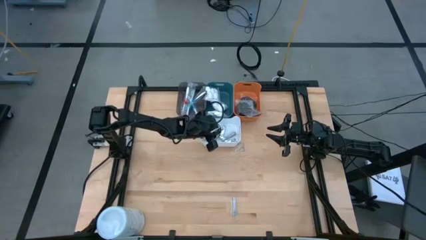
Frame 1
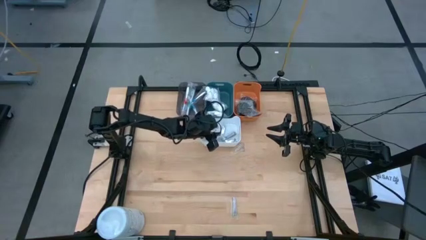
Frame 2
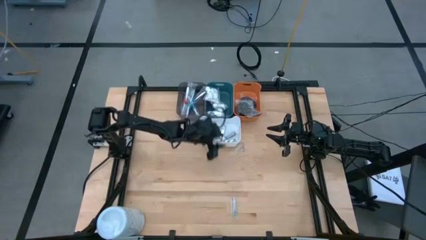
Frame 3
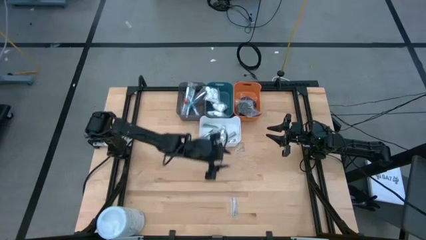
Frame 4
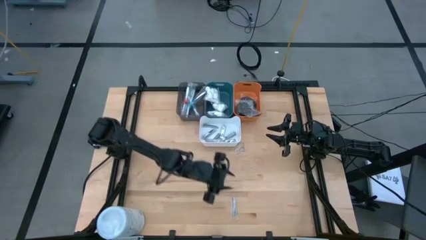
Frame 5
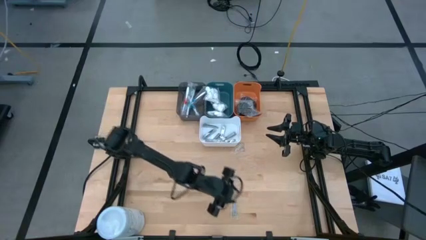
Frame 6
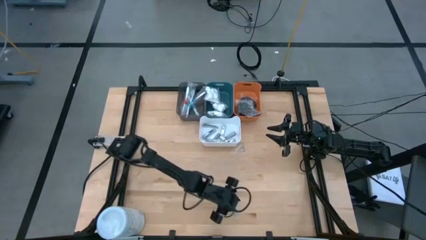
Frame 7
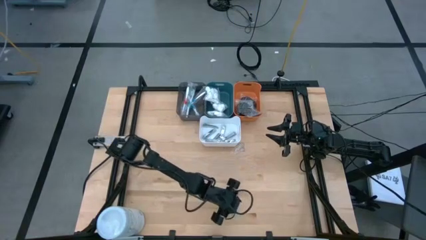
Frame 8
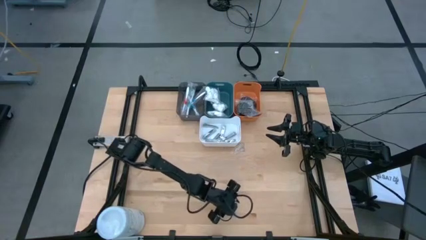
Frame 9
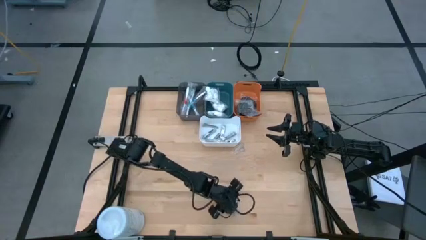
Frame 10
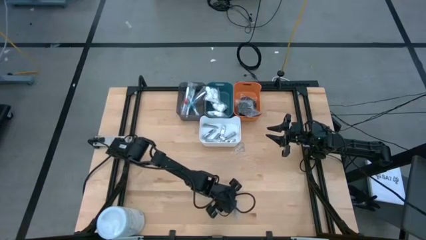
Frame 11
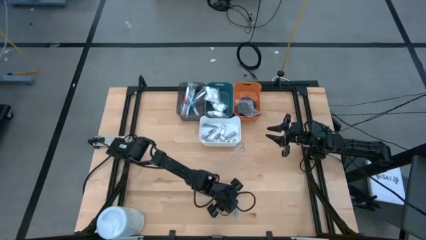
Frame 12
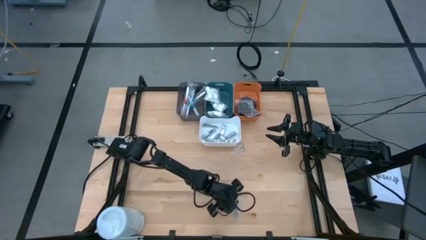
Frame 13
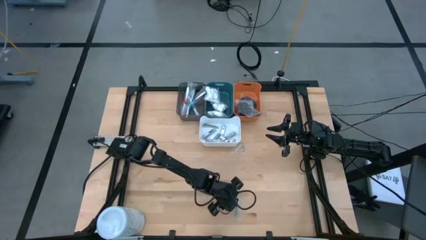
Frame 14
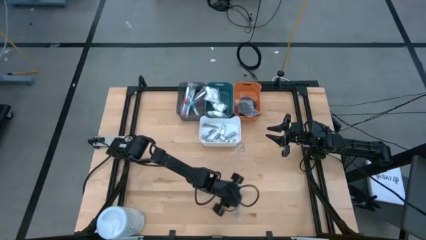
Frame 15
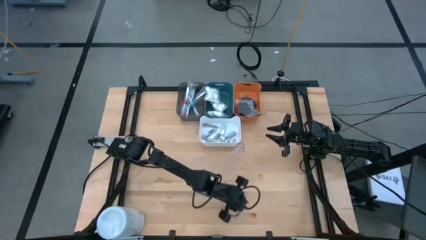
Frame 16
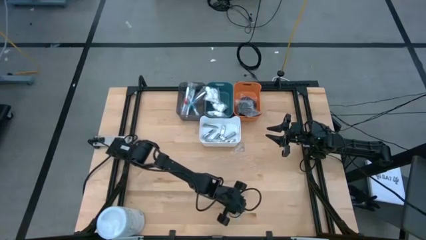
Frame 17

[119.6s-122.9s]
Task: Pick & Place Travel size toiletries
Put the silver nail cutter into the white bin

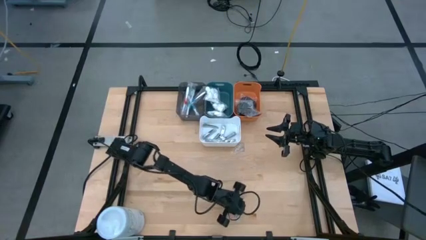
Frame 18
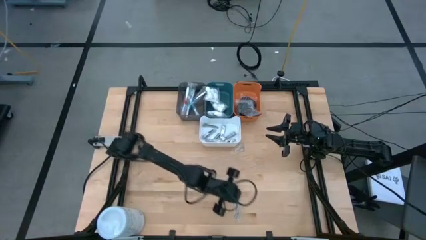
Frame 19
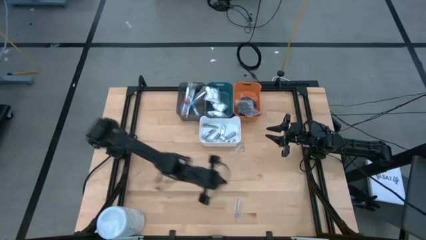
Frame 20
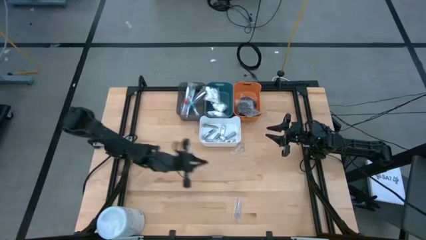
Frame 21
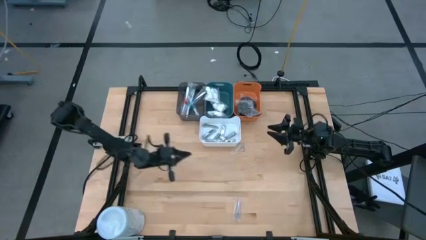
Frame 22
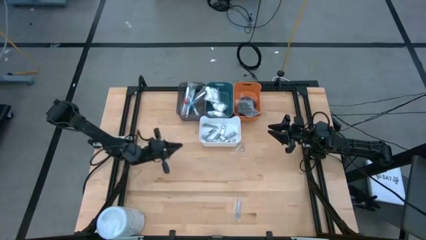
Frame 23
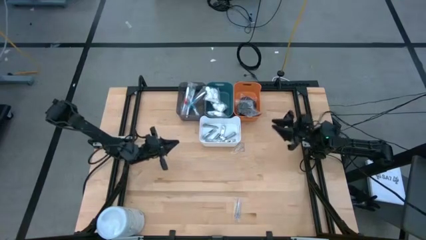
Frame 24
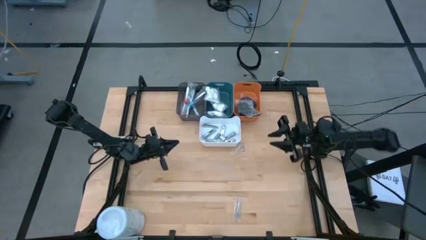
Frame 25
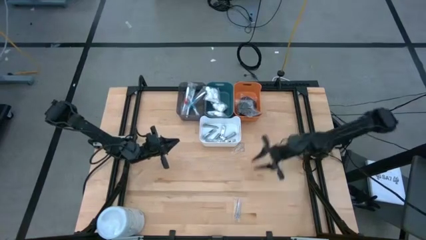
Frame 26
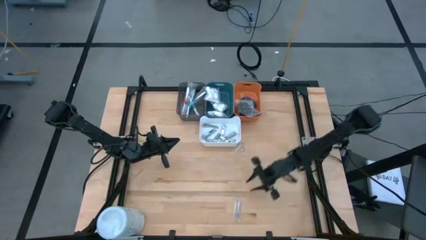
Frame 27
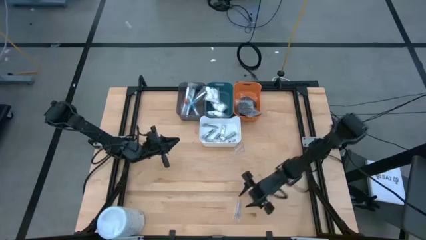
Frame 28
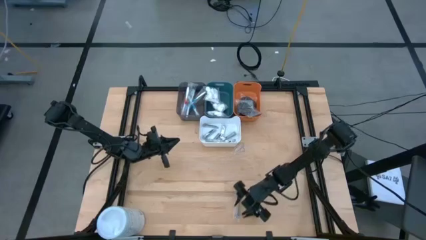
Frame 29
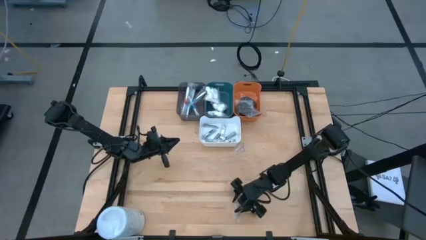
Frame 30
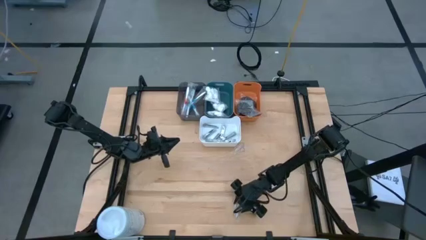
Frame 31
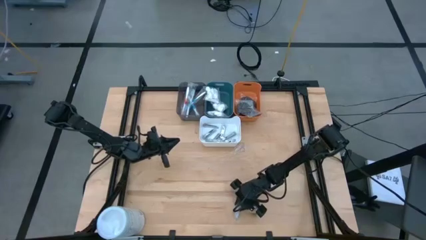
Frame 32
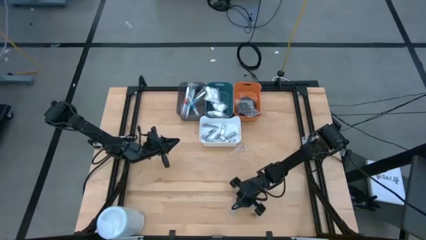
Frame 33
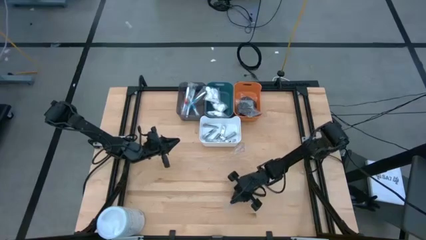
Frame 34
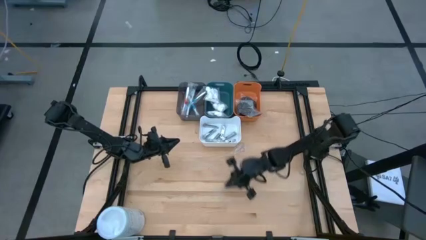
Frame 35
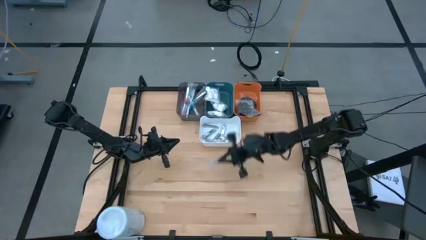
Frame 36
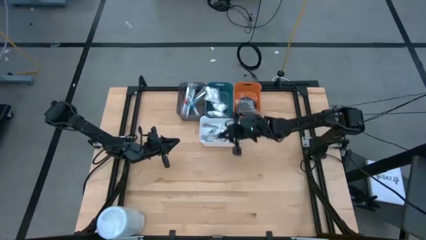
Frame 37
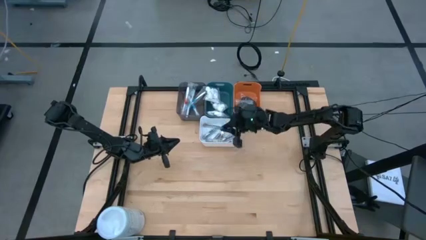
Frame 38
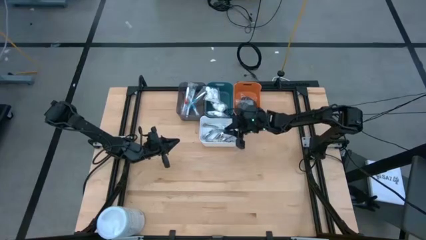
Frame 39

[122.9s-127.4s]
Put the silver nail cutter into the white bin

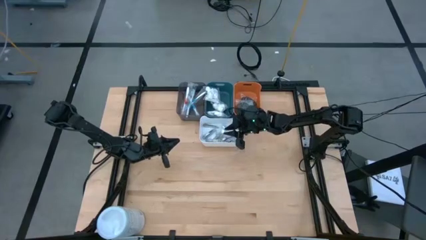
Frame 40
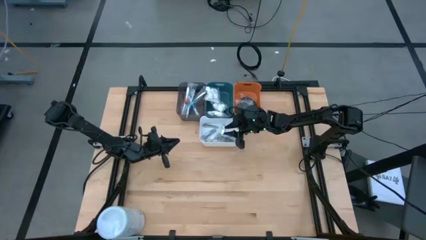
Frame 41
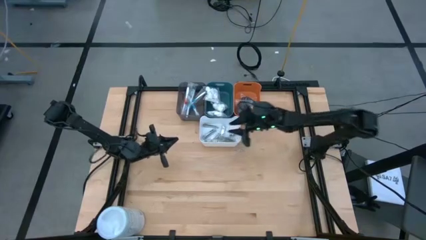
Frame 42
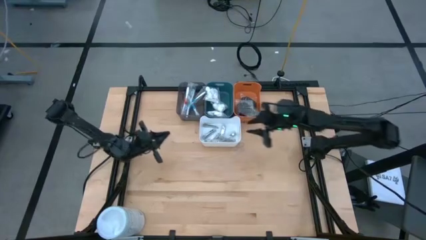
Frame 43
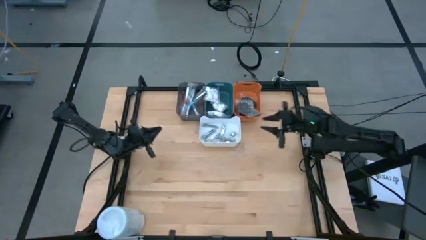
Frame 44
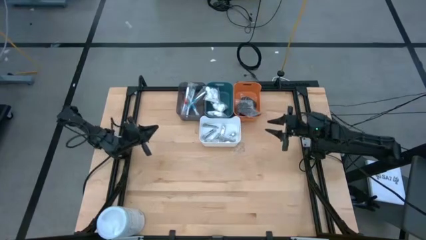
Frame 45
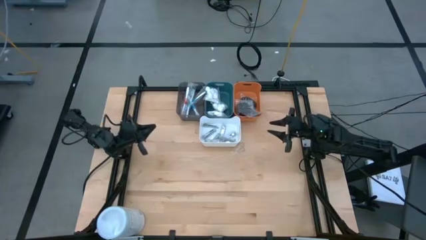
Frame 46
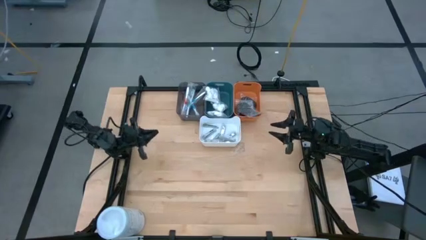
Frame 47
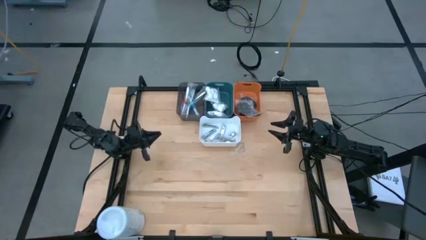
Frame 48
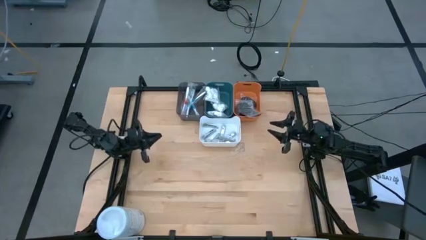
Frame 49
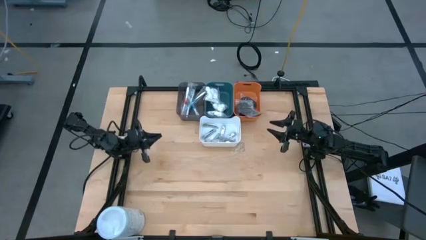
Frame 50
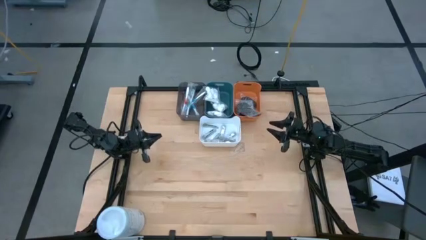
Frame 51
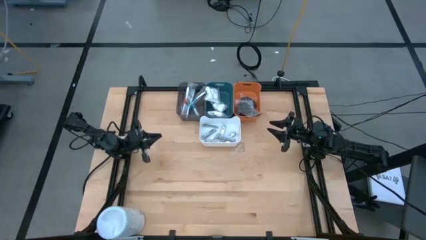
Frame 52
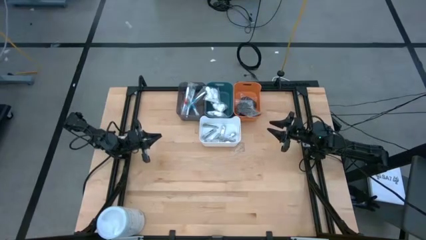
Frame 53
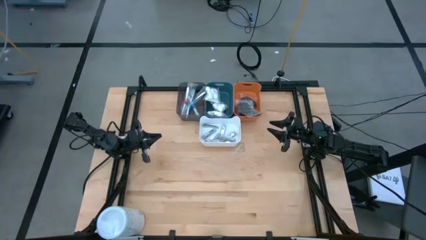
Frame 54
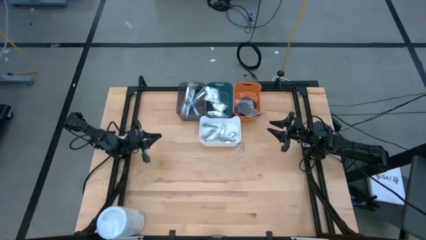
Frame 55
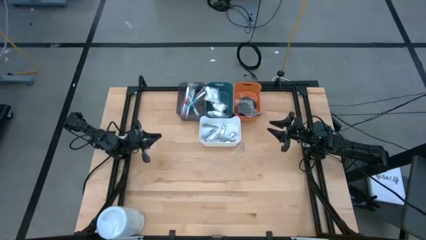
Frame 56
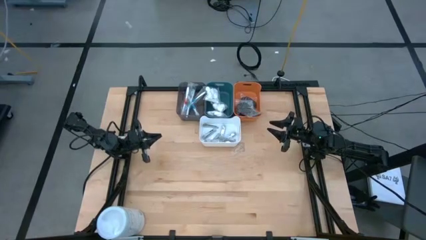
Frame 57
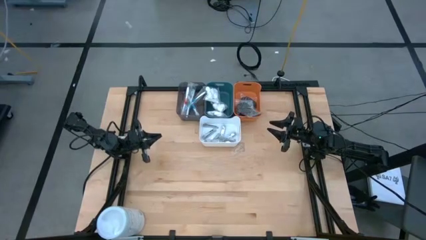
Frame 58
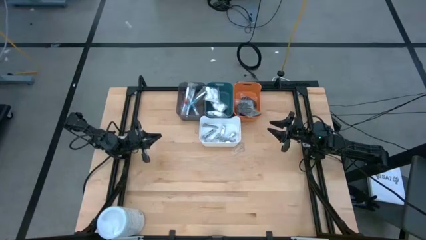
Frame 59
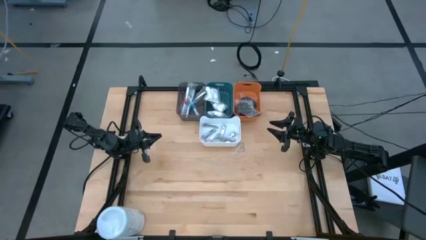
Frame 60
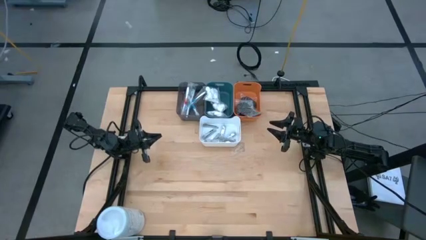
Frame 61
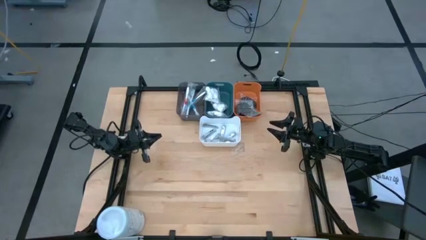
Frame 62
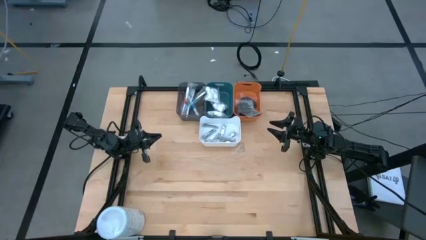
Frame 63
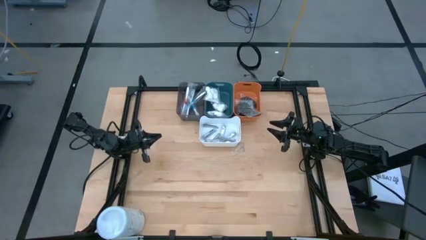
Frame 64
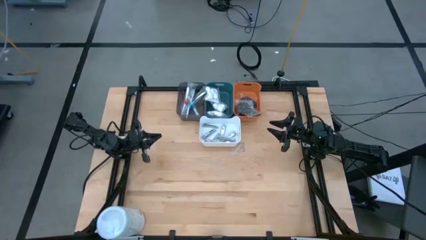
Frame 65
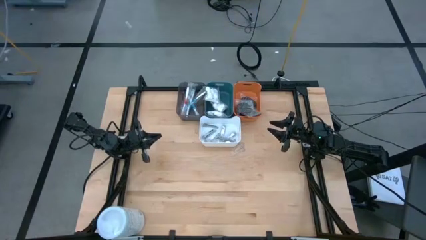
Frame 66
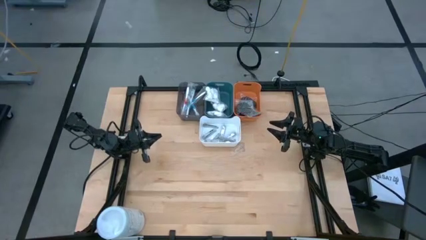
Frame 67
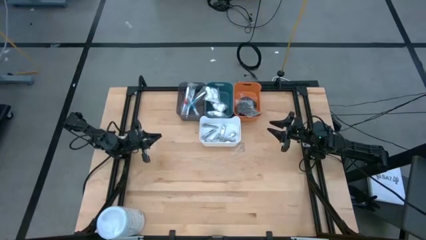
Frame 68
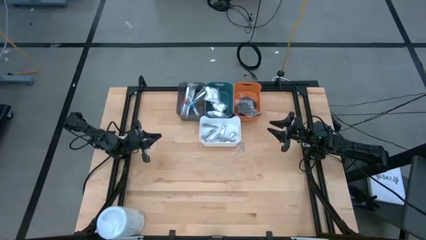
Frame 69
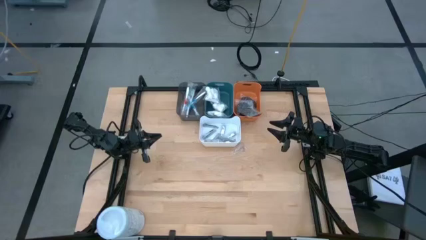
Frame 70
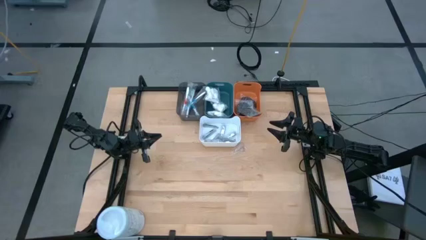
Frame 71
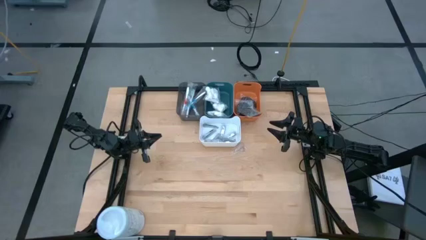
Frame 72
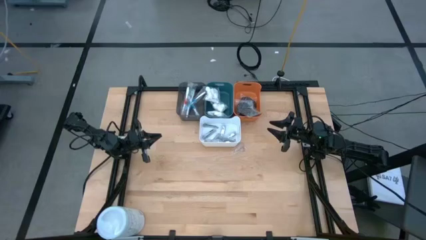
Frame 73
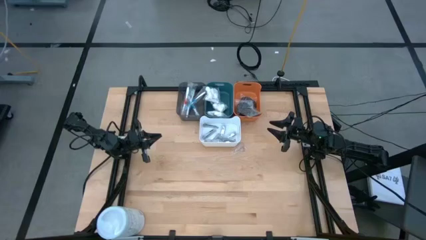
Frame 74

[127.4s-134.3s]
Return to Home Position
